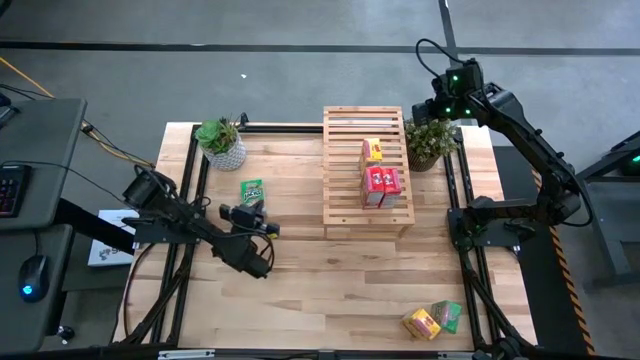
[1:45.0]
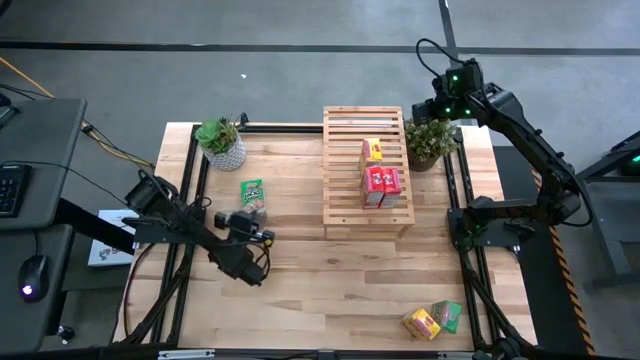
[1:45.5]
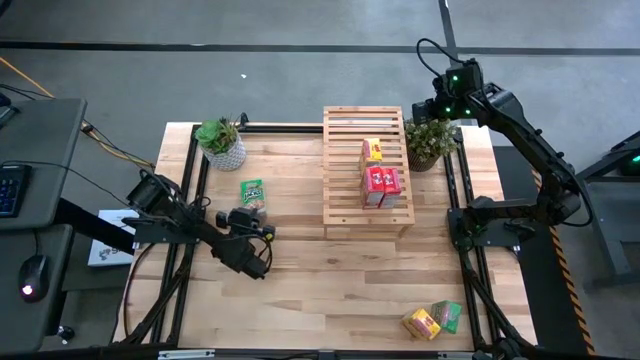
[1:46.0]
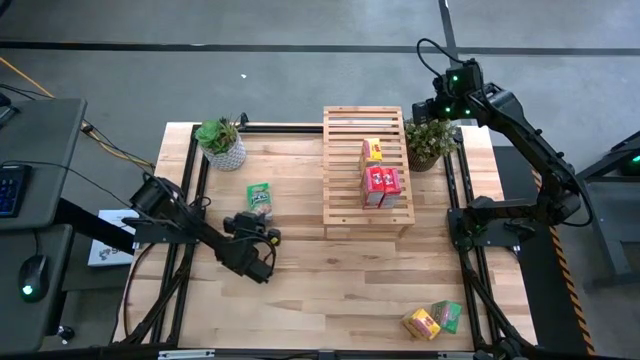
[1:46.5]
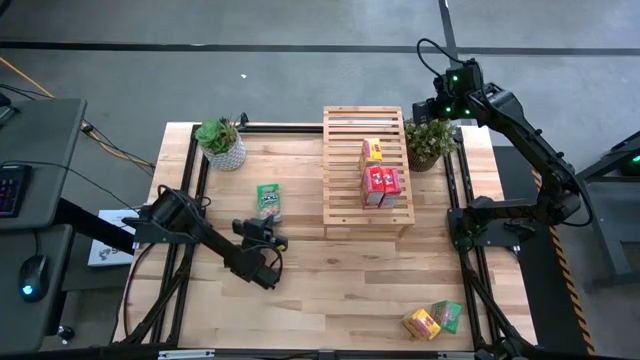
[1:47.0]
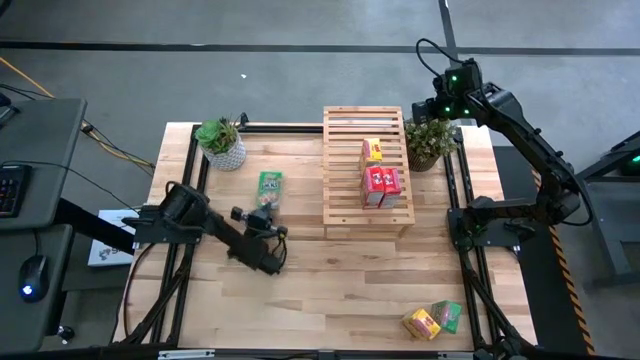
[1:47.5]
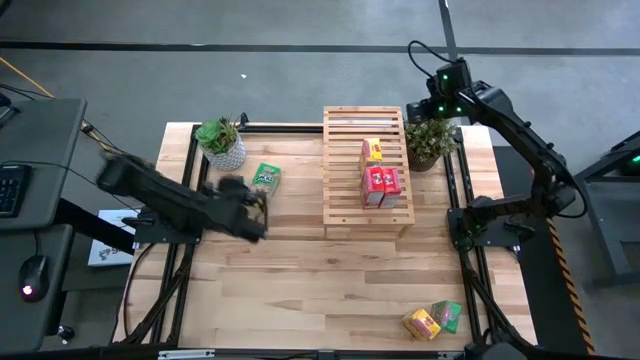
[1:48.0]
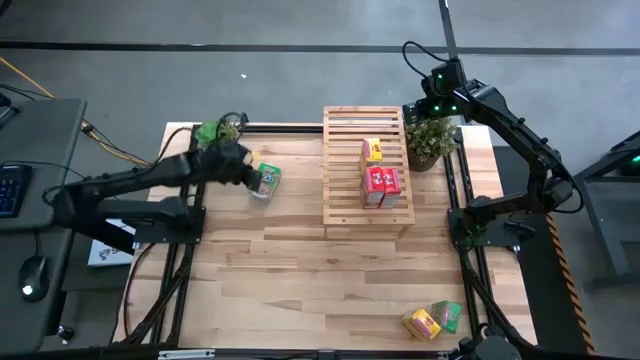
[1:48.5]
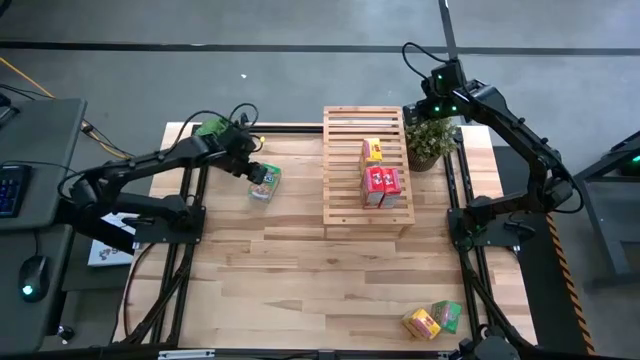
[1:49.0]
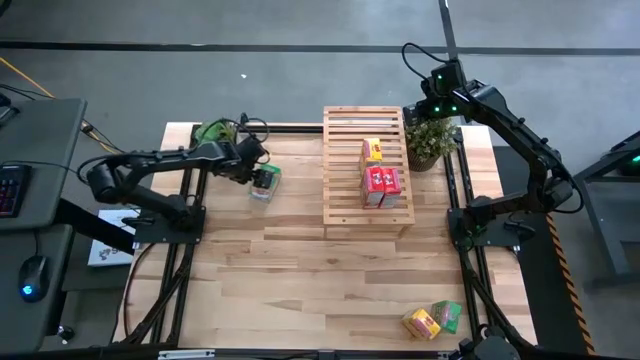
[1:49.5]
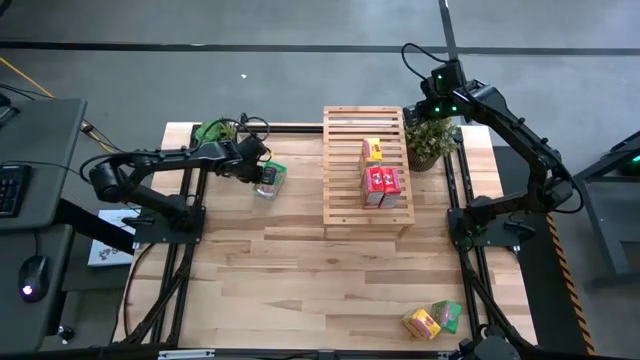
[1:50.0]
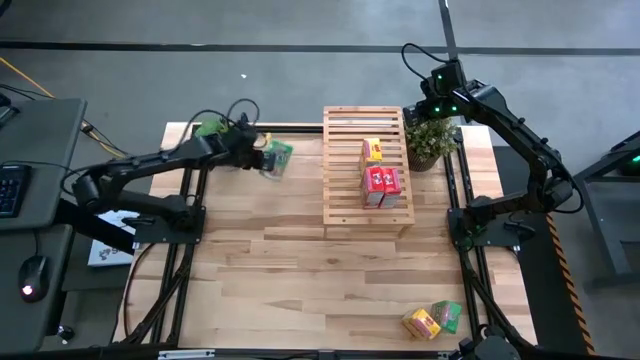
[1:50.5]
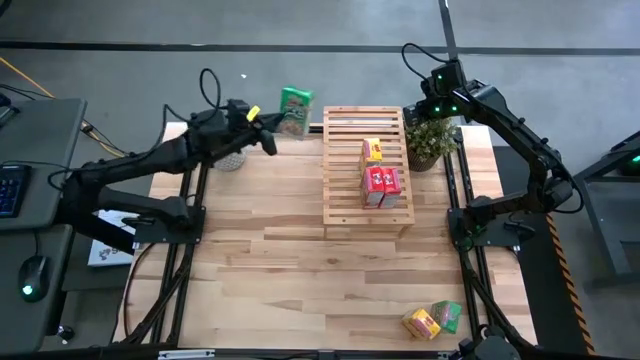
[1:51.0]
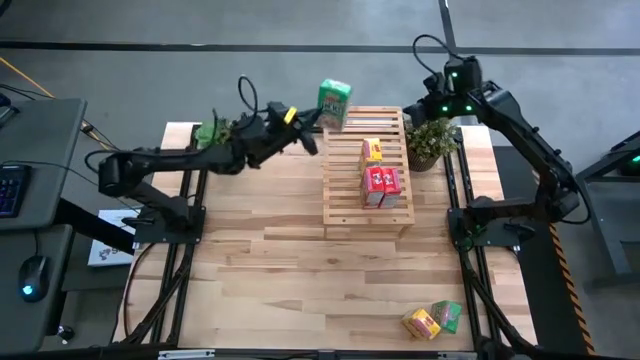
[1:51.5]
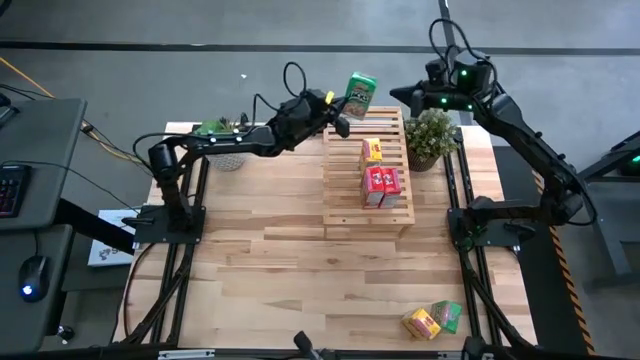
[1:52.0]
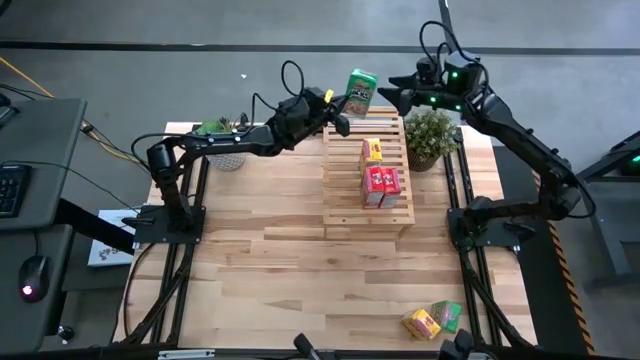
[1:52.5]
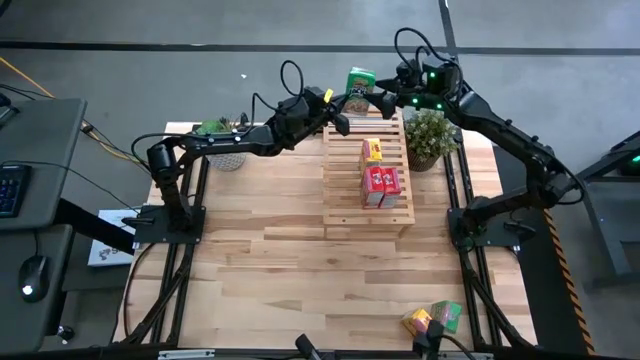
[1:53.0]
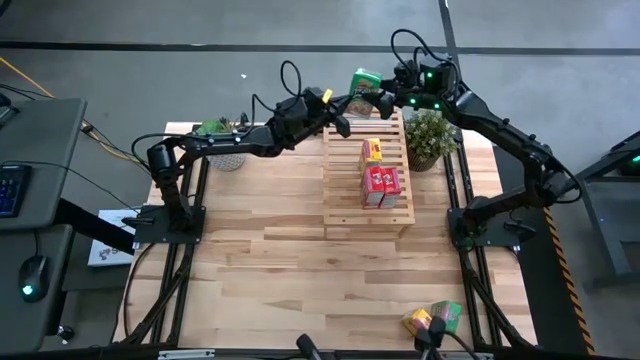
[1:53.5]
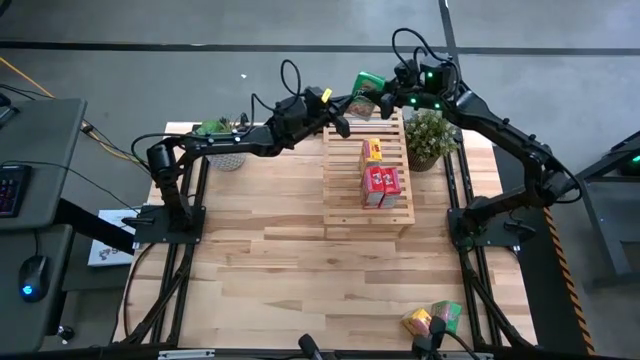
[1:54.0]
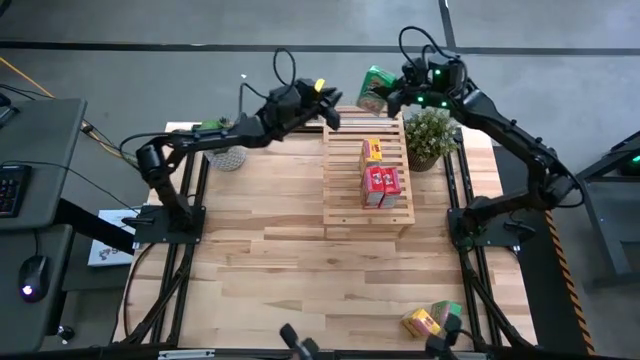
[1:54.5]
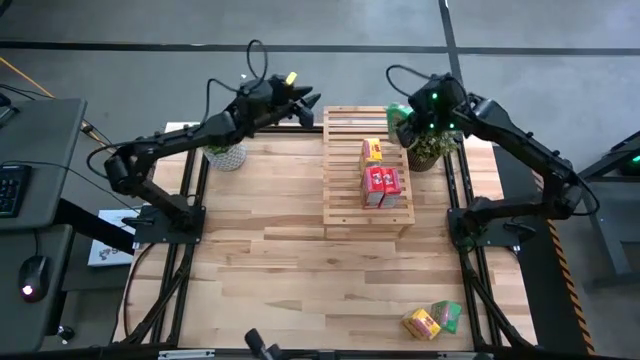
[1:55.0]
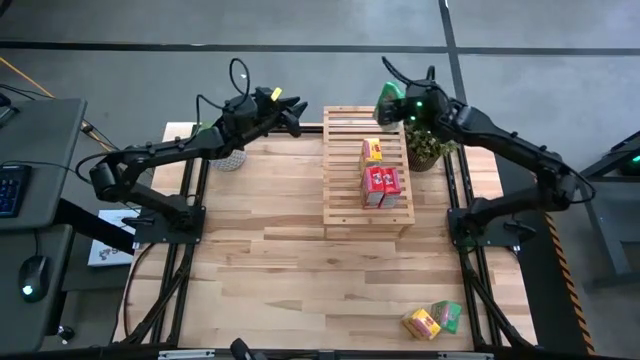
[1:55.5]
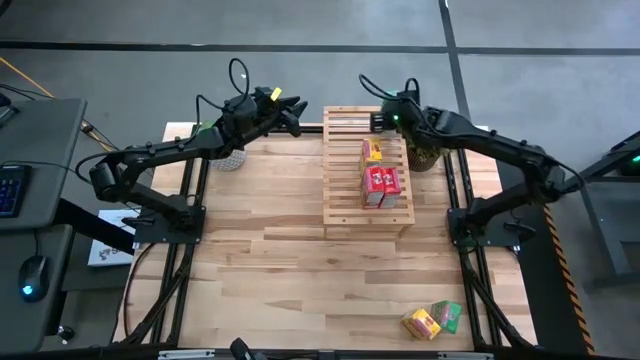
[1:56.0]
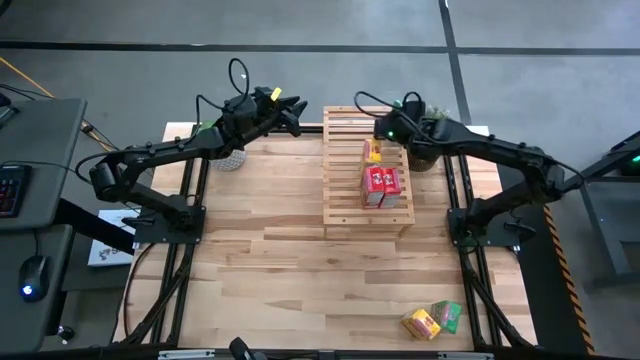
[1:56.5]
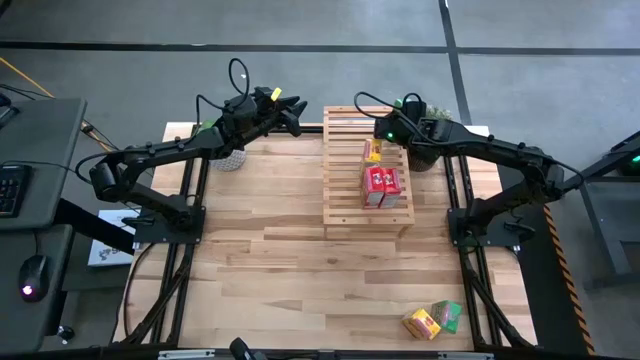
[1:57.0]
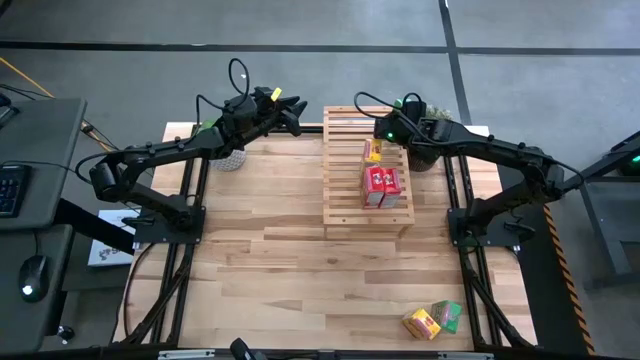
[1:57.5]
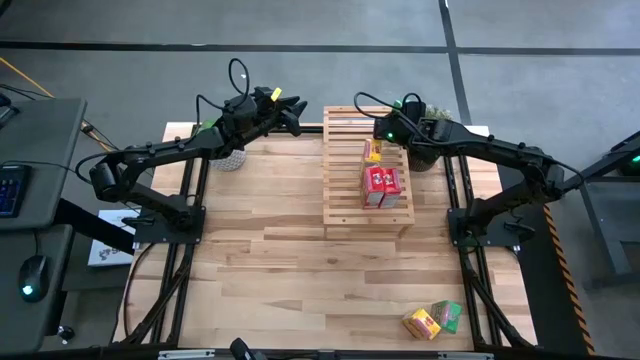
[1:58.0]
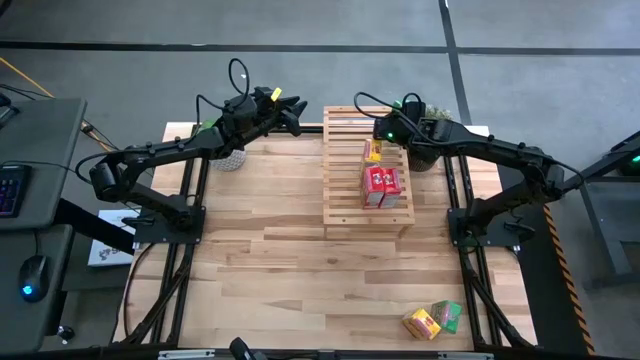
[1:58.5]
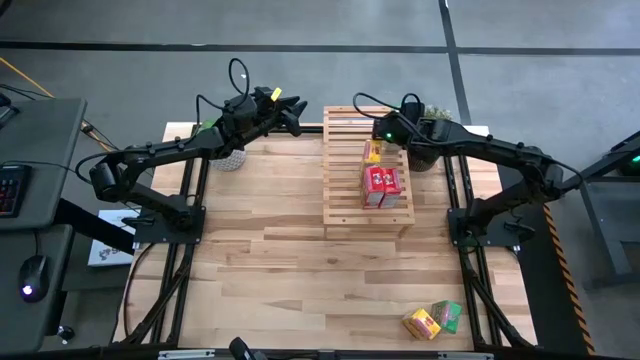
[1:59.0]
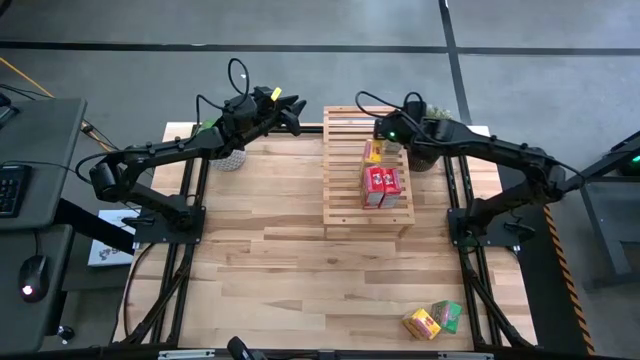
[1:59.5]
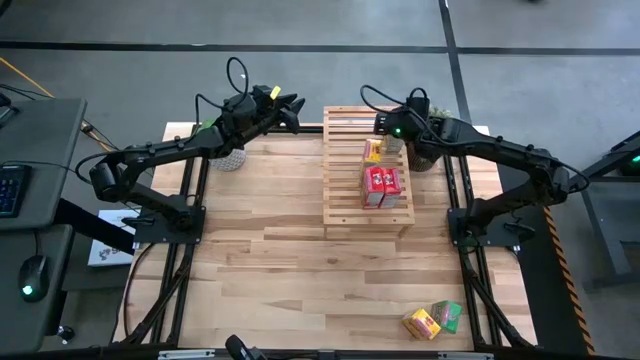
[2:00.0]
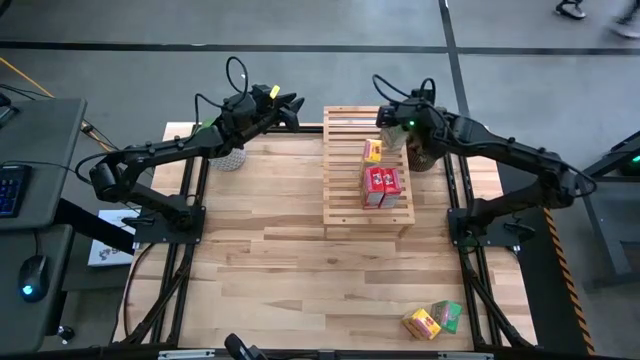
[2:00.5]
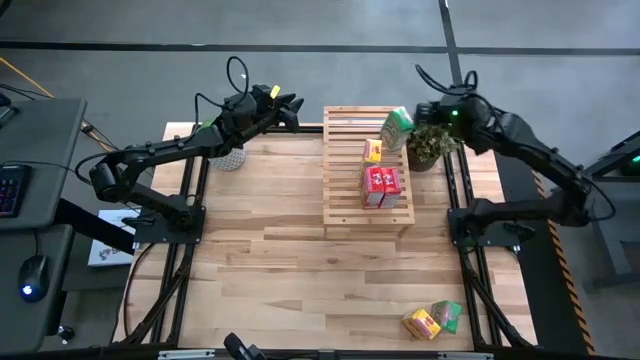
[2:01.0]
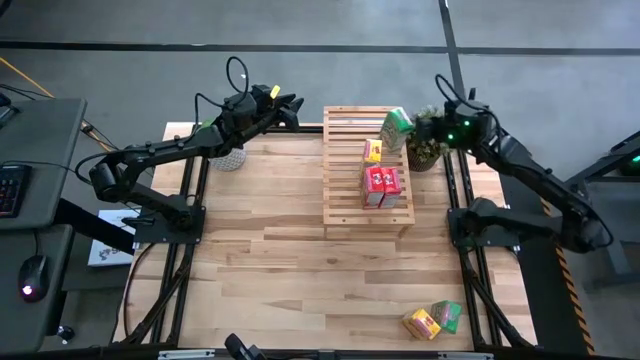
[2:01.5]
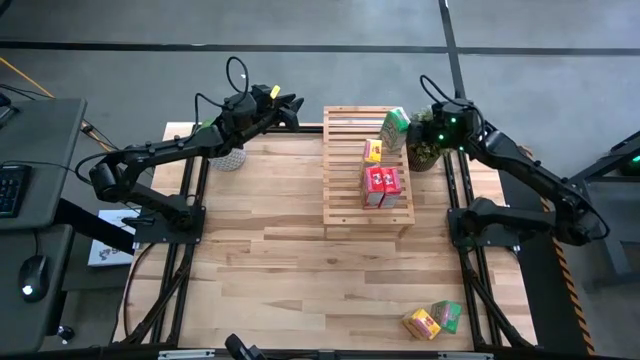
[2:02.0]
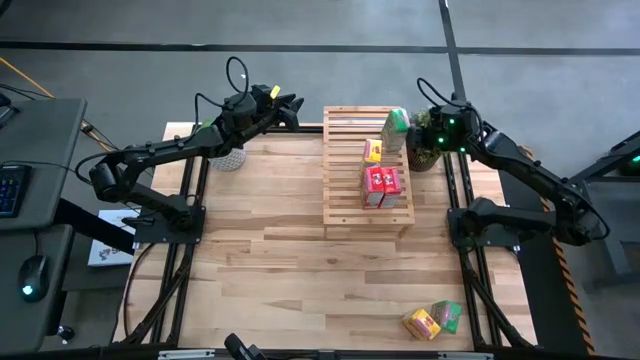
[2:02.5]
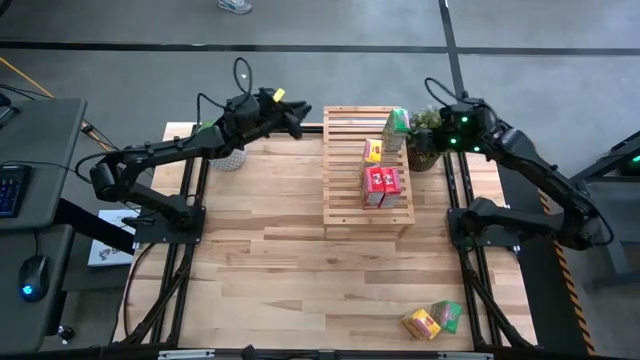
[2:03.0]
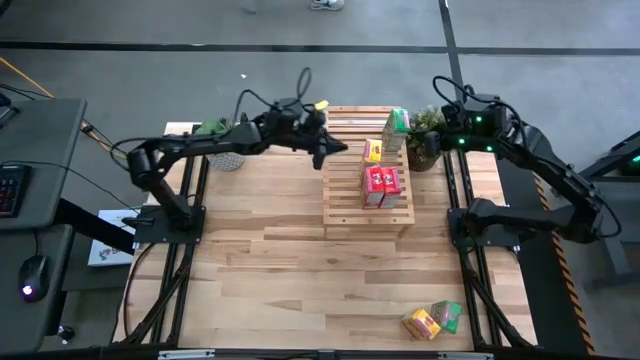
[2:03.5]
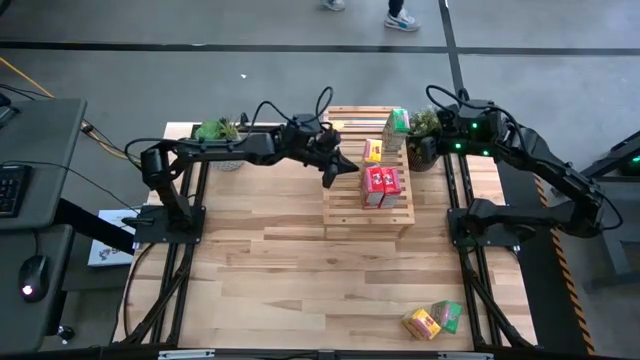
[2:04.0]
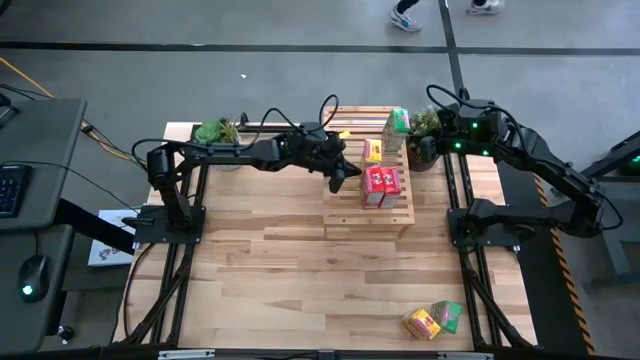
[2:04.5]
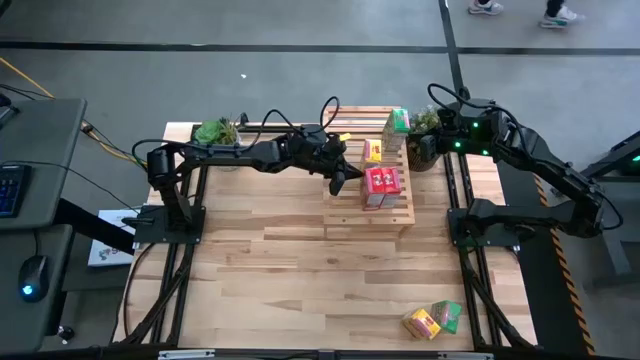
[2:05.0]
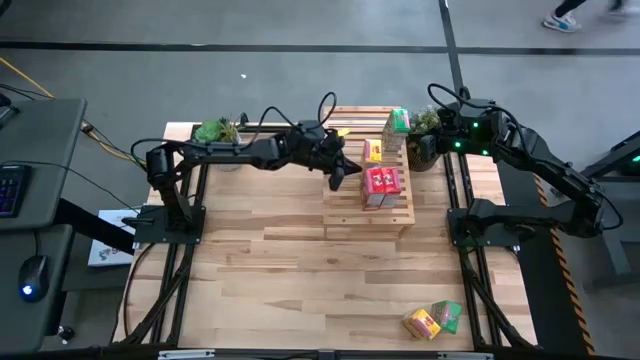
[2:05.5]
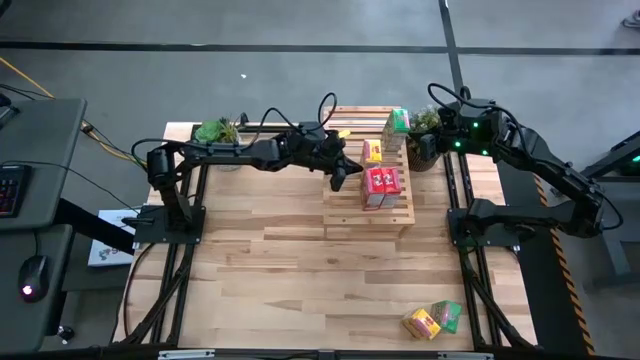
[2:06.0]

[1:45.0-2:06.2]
Task: Stack cereal on shelf
Put the top green cereal box on the shelf
